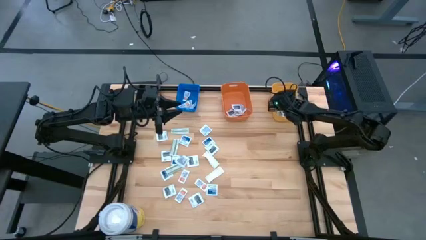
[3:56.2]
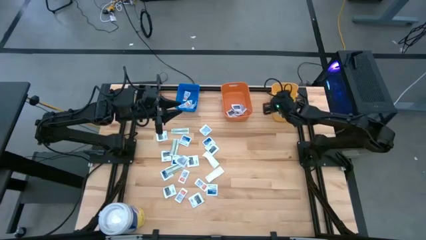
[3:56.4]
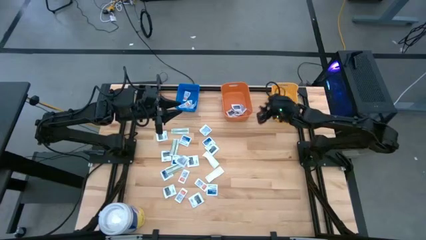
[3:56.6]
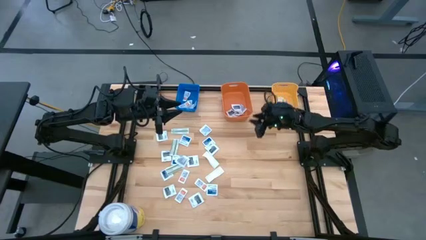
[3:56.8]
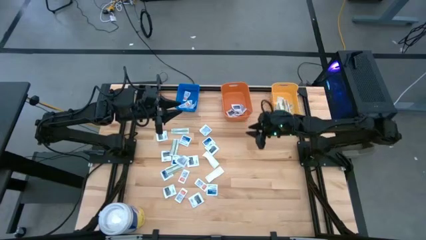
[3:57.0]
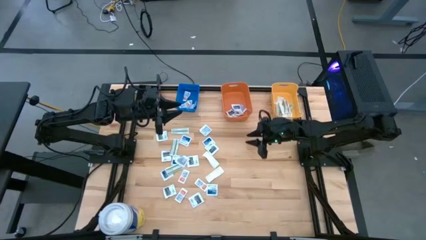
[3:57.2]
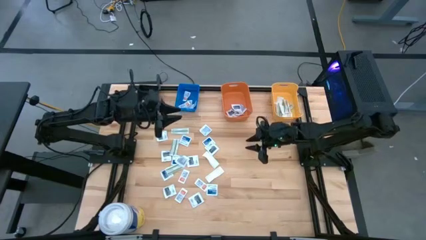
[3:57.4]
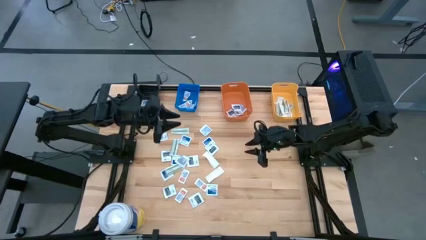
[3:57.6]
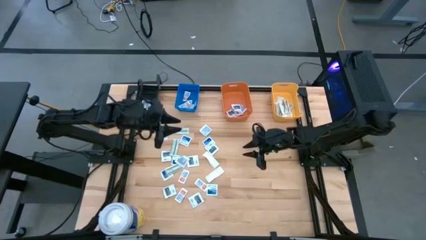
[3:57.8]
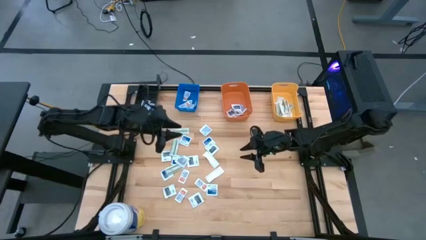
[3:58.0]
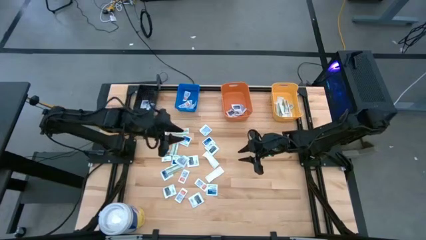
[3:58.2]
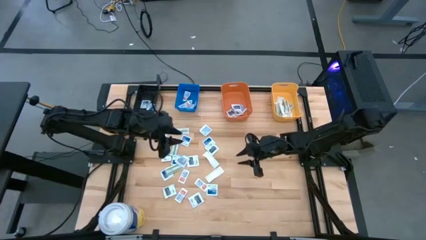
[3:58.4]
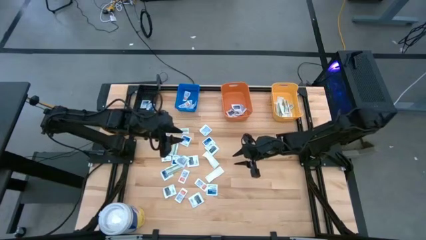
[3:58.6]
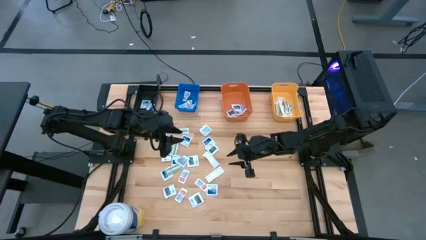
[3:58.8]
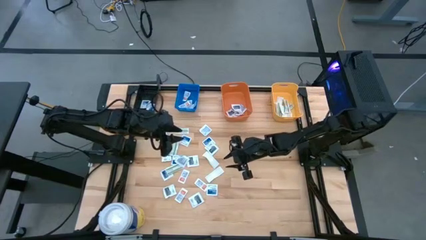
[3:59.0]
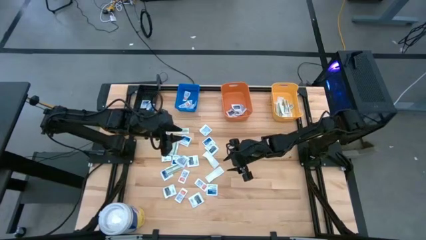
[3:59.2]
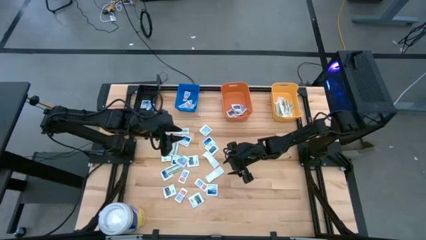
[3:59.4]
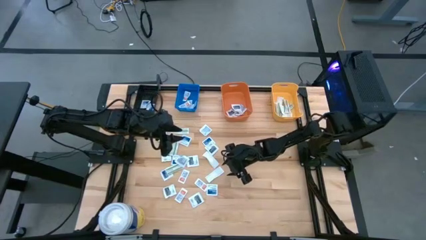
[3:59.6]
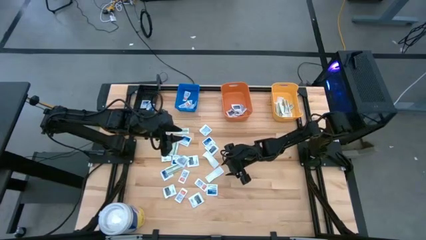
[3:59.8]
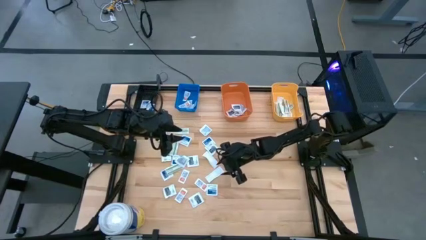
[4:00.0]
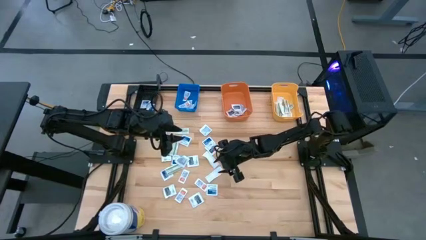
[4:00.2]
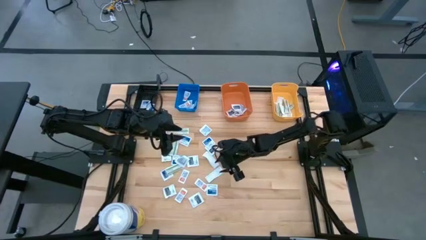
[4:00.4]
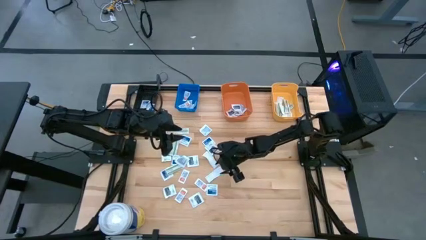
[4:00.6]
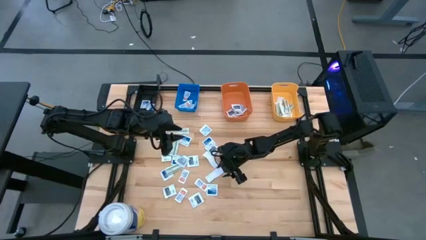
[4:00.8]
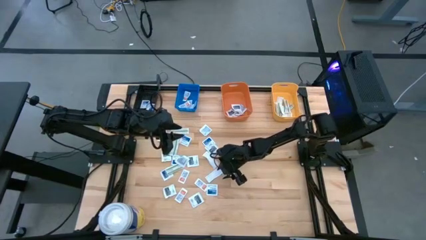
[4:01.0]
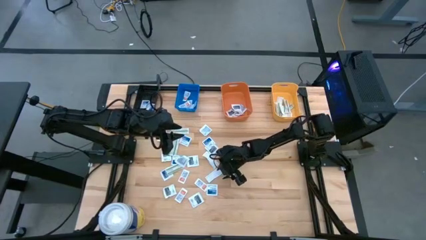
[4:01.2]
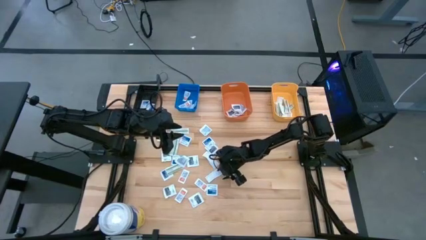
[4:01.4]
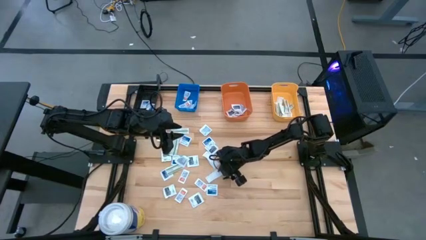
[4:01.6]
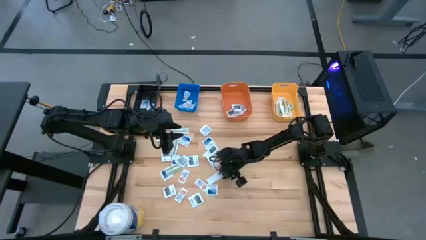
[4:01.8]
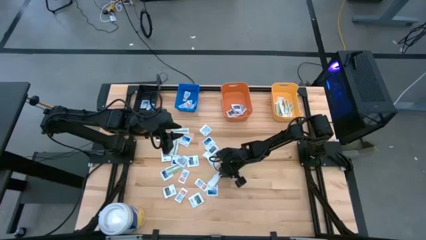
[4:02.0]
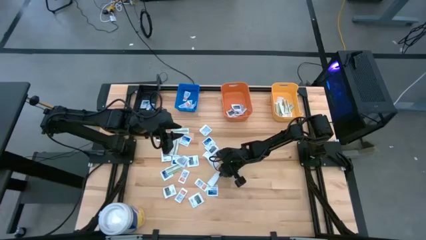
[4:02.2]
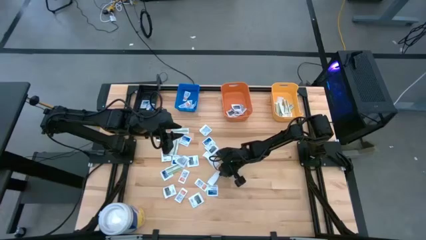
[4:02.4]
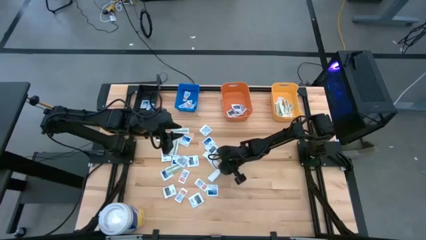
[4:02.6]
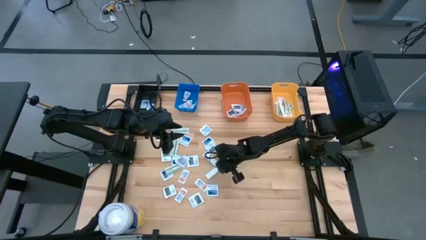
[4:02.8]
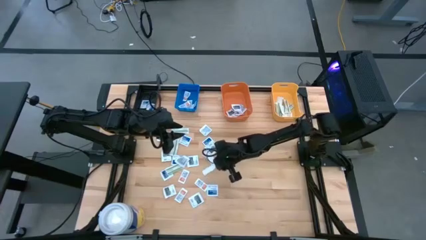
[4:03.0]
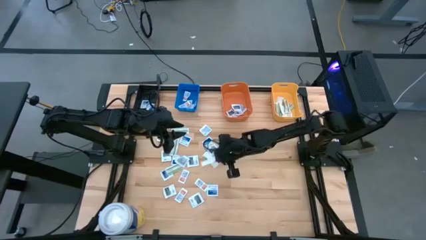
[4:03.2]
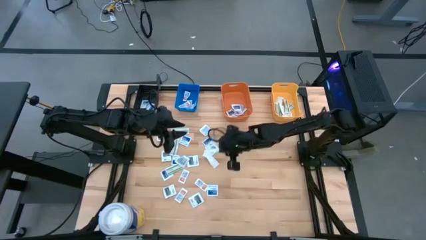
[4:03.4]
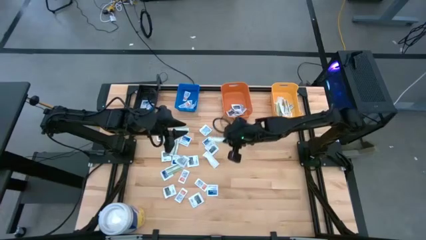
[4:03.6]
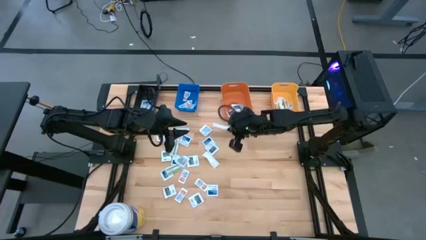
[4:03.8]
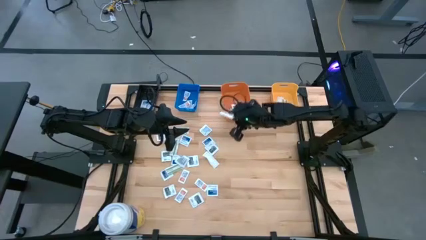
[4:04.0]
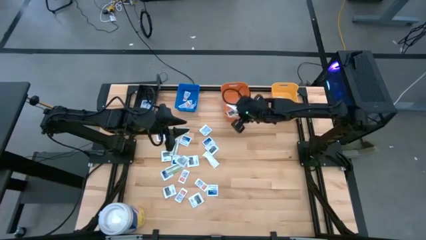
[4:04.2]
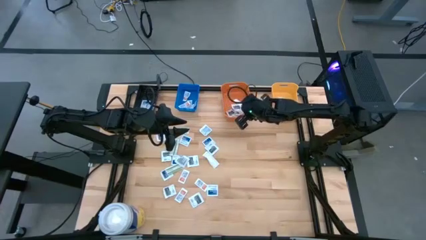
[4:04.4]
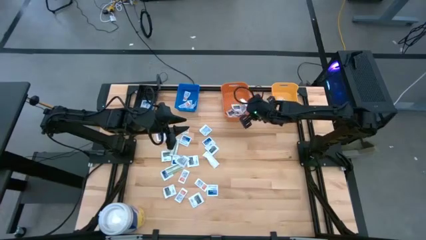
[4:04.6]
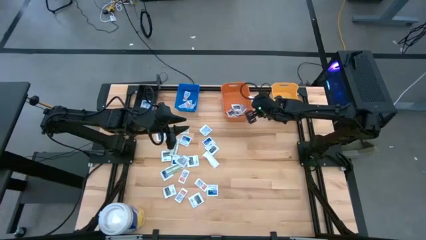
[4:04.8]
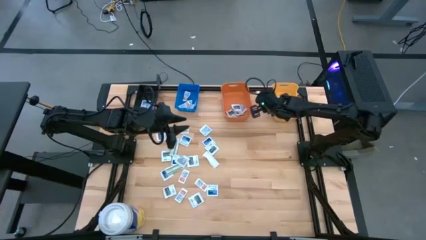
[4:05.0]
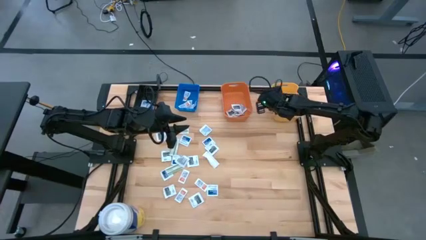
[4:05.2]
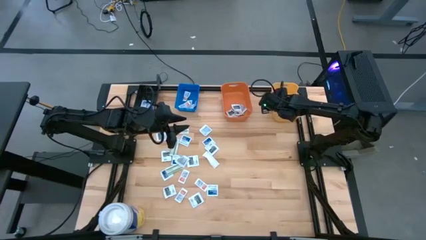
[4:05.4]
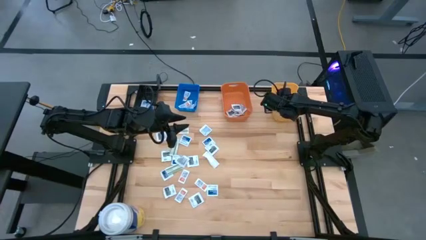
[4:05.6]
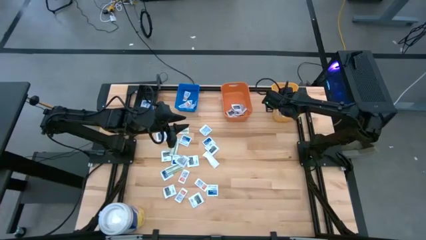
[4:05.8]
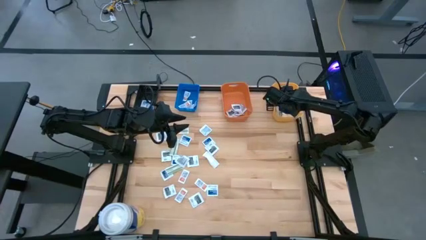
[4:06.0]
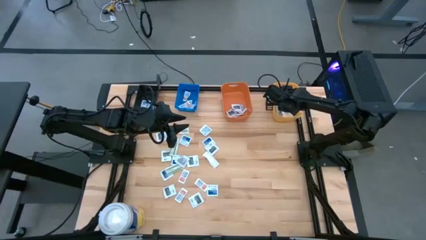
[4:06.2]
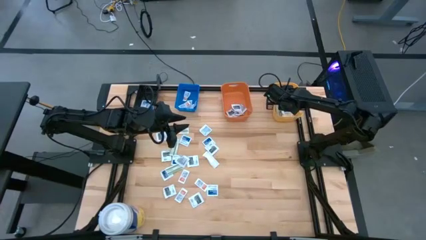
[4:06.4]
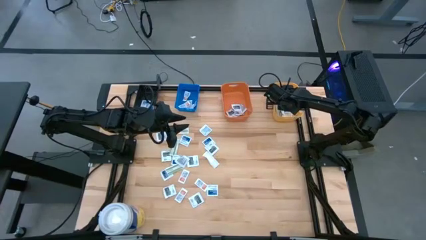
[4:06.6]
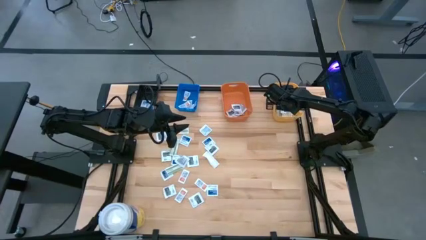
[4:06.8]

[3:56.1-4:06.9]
Task: Pick & Place First Aid Supplies
Put the bandage into the yellow bin

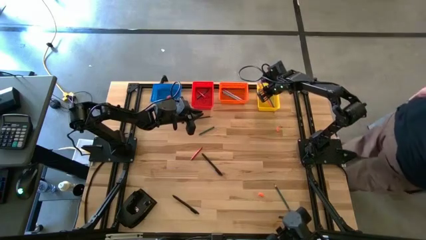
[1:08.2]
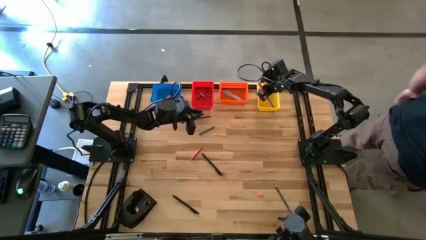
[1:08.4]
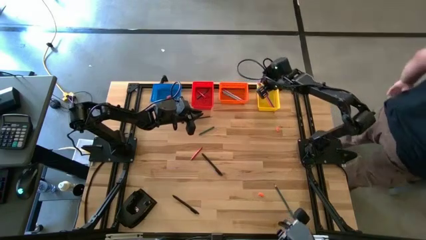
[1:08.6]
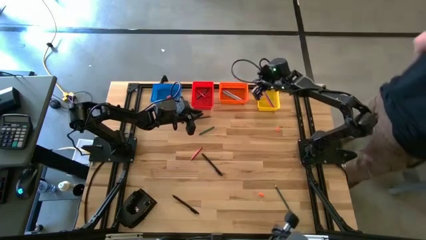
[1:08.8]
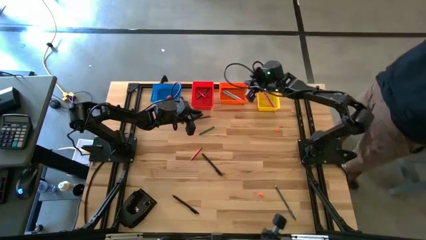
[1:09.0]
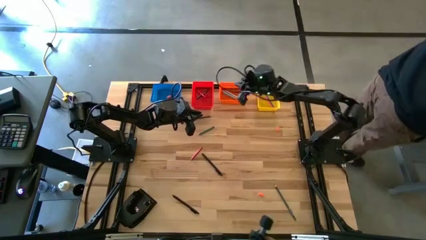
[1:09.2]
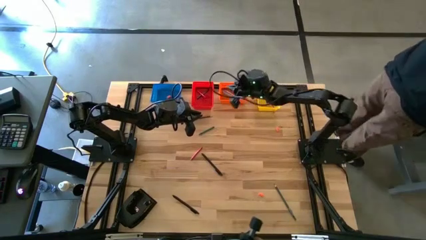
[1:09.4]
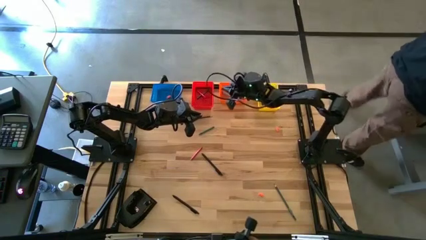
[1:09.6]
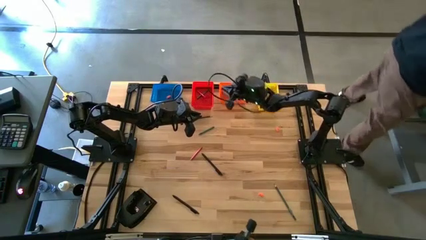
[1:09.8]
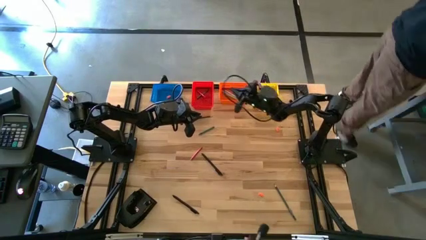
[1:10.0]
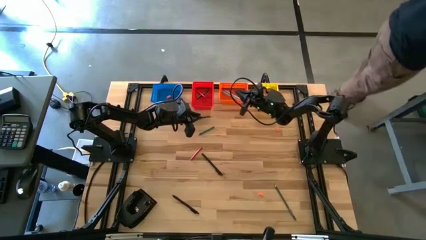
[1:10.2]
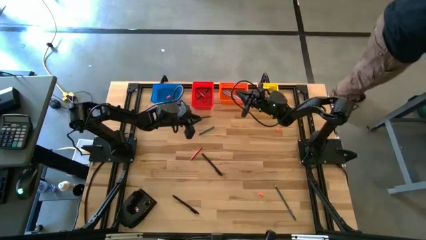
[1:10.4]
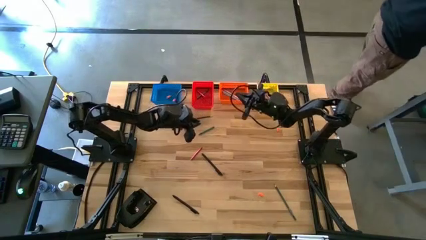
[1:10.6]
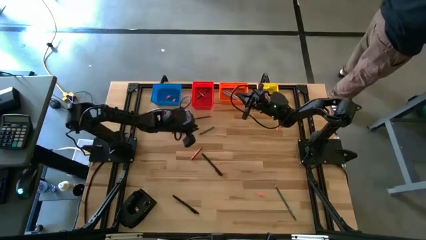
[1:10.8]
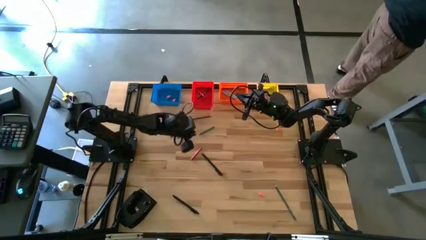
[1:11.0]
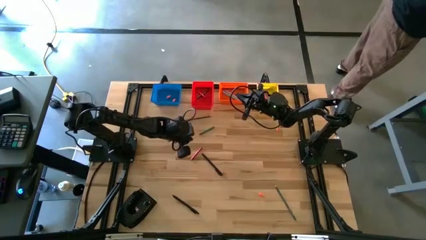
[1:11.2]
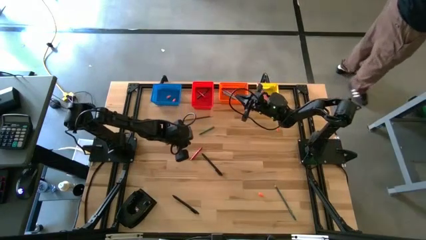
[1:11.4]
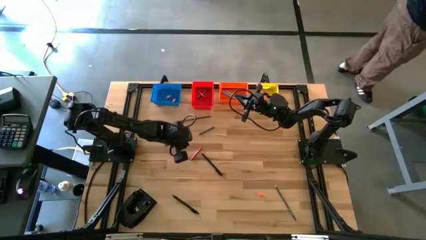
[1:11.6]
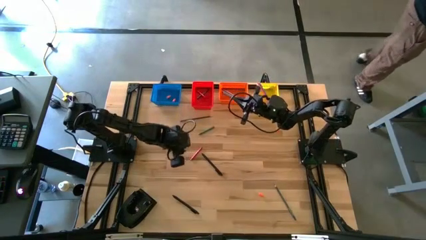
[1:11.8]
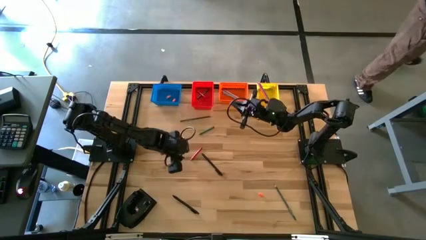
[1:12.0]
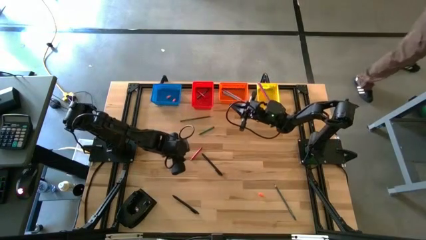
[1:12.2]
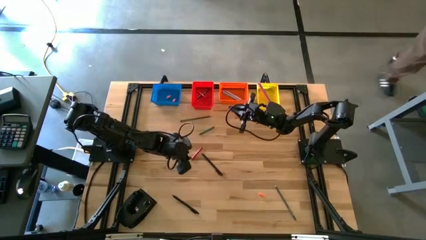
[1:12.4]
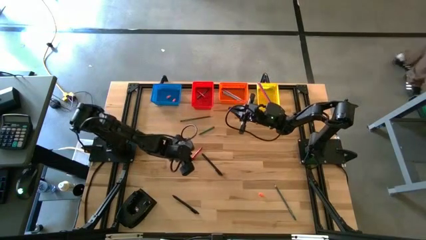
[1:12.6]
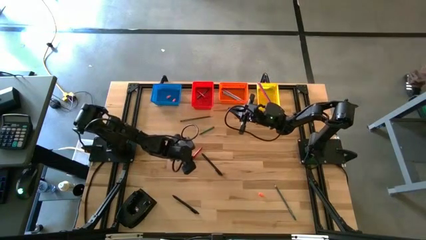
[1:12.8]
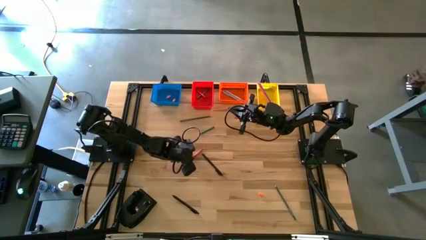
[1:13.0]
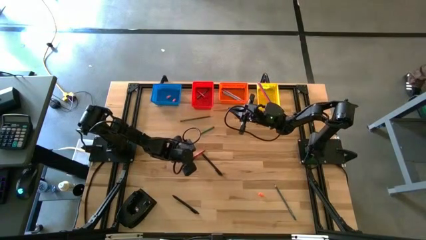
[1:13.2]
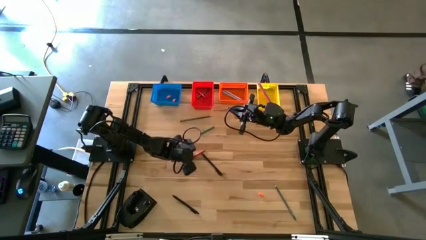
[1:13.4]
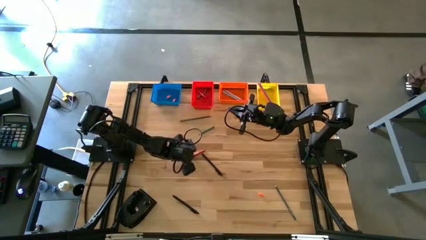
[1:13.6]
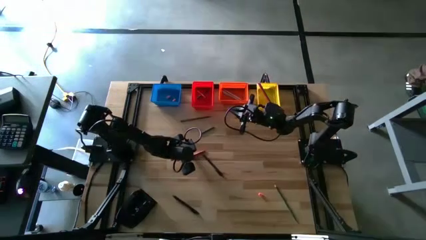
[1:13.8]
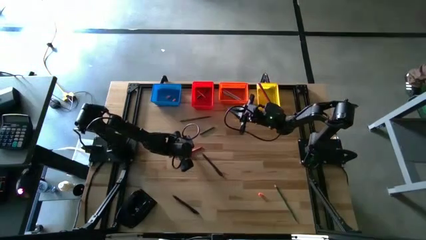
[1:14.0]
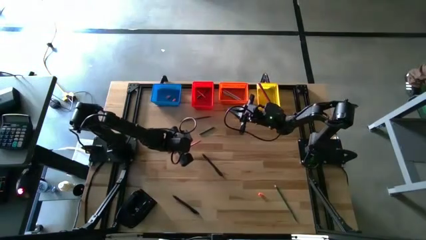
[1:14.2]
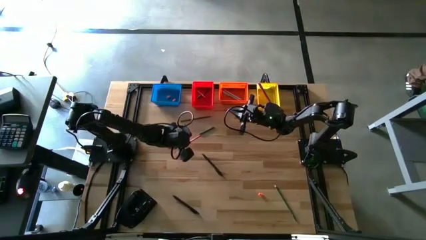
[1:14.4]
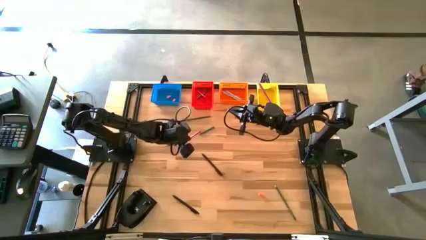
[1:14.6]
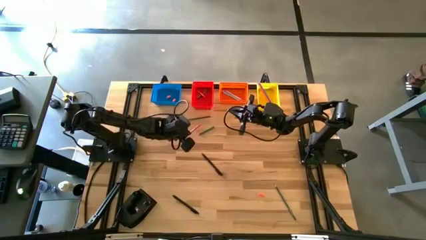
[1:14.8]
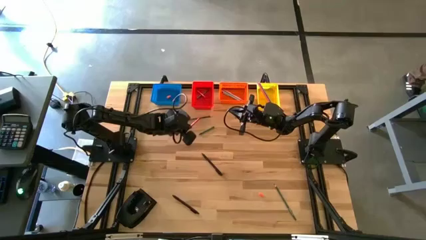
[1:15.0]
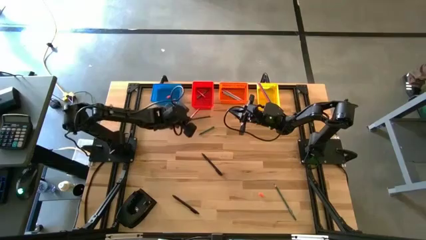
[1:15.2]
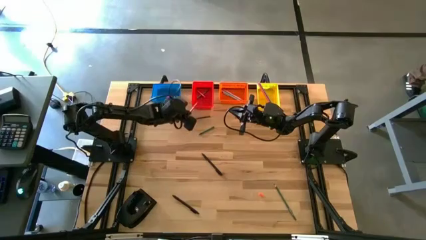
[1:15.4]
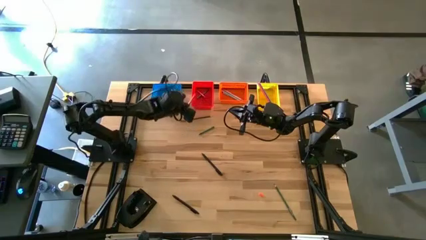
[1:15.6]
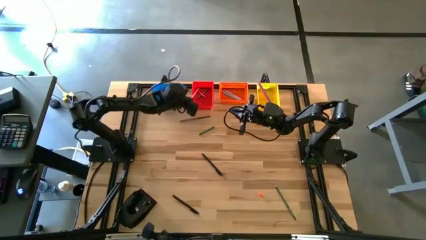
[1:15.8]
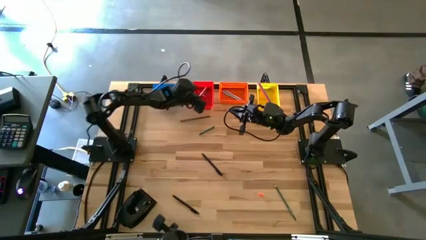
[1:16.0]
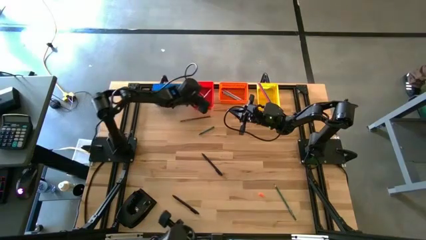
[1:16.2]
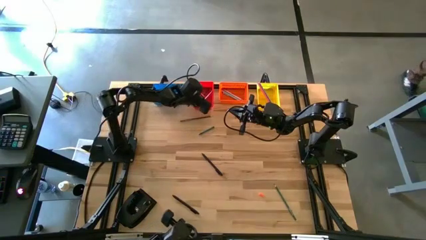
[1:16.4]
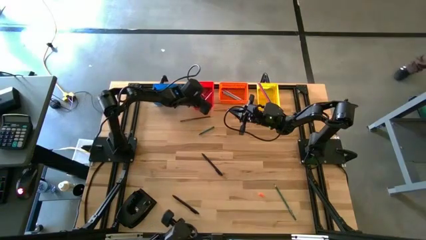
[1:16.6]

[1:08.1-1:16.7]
Task: Sort crayons/erasers/pens/pencils in bins
Put the red crayon into the red bin
